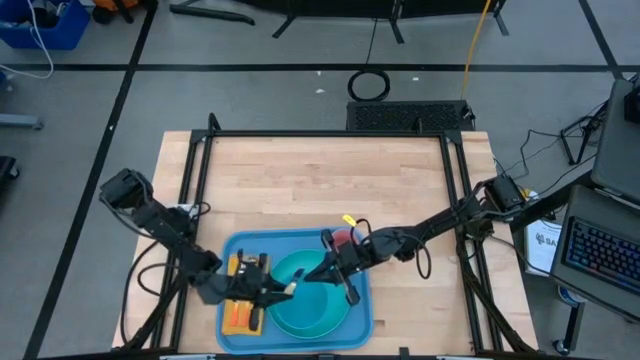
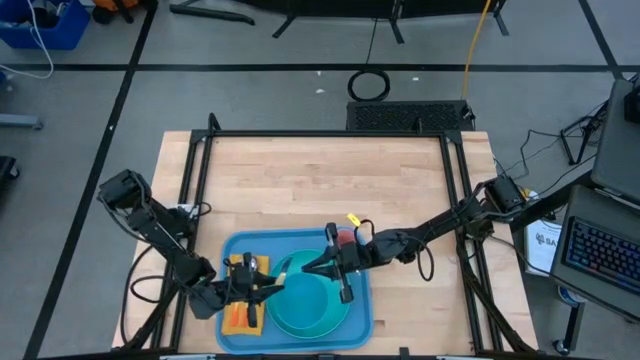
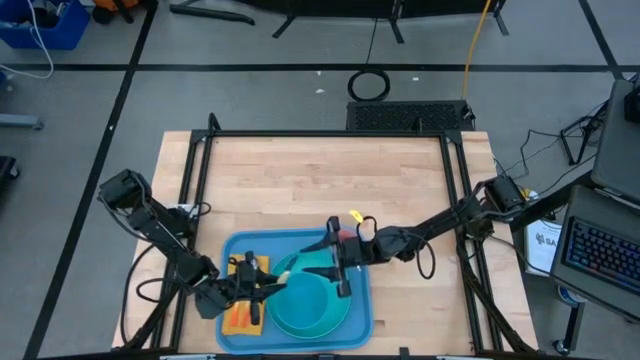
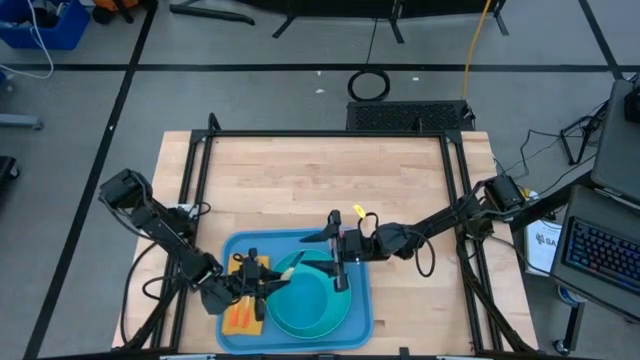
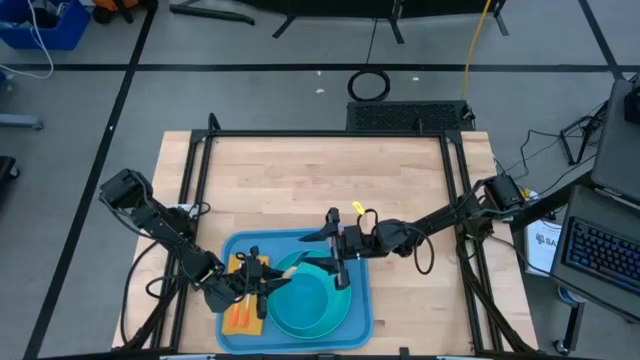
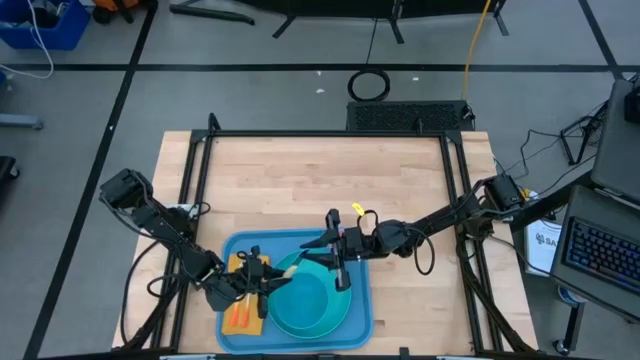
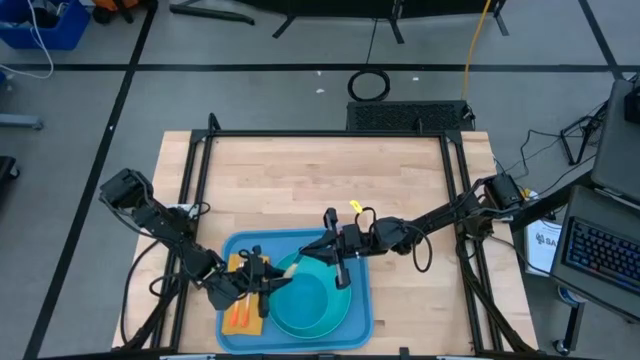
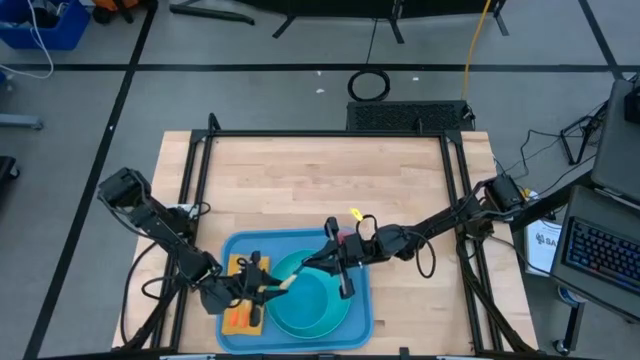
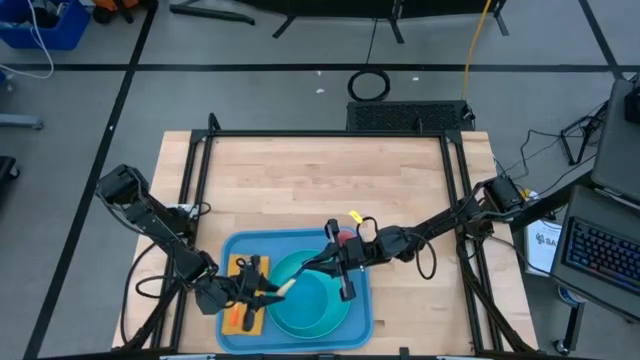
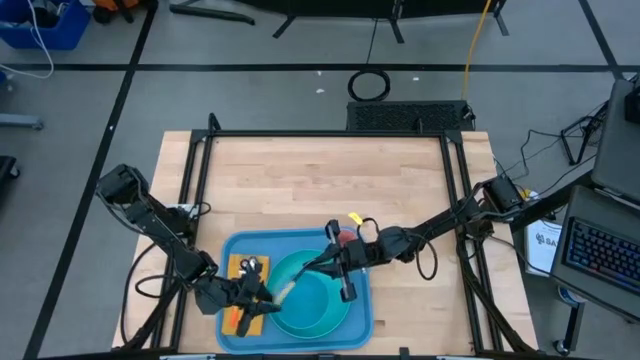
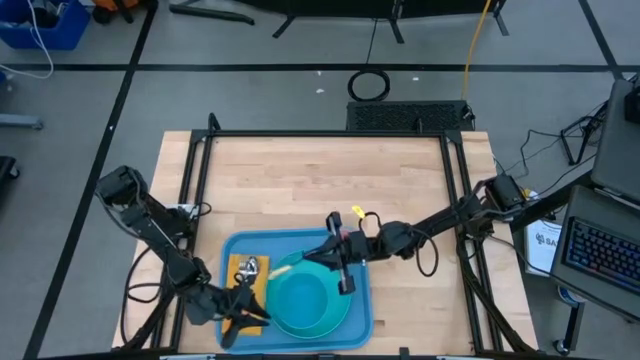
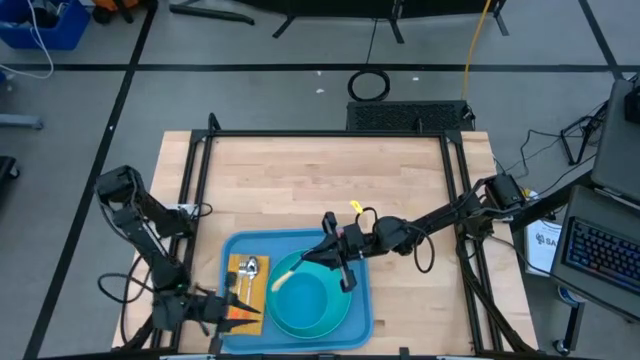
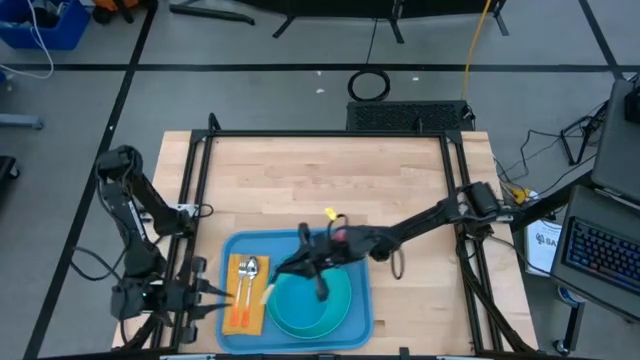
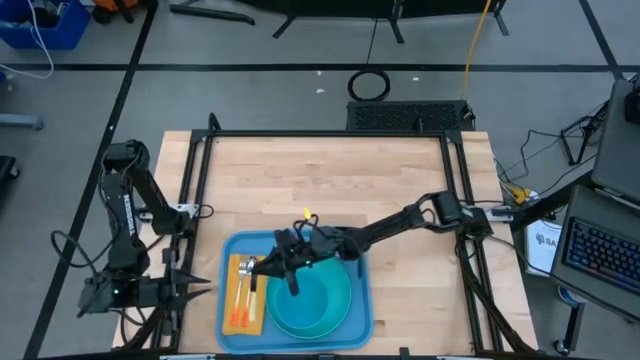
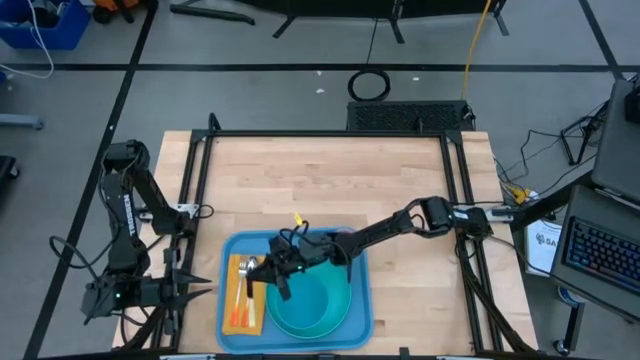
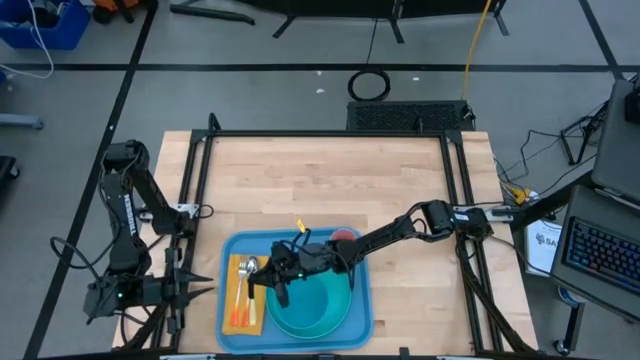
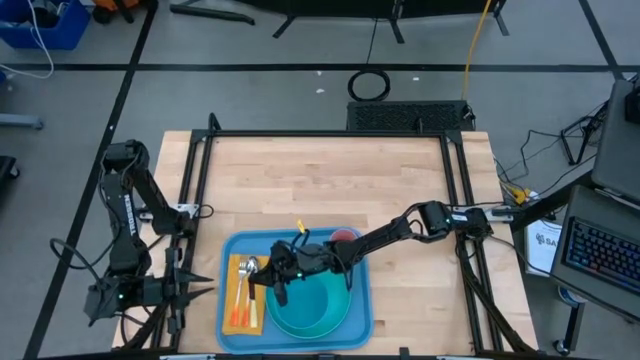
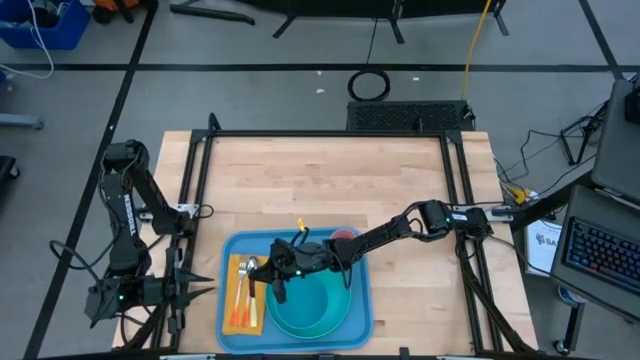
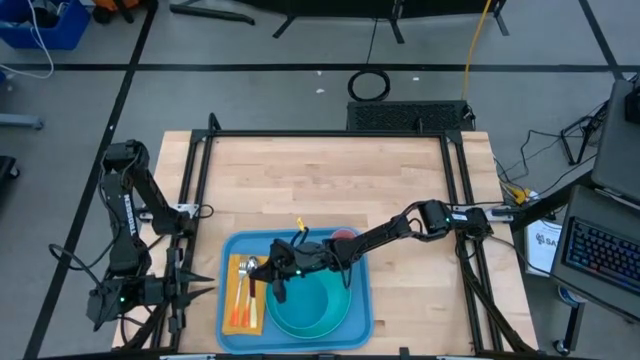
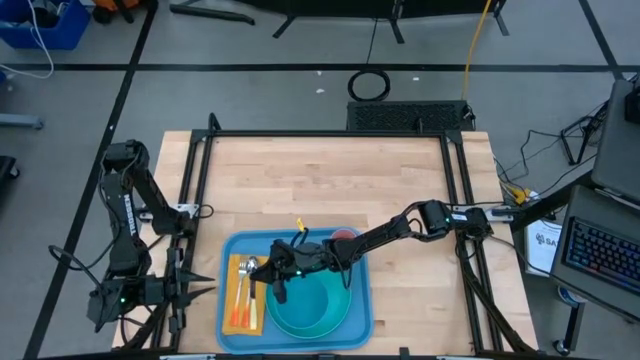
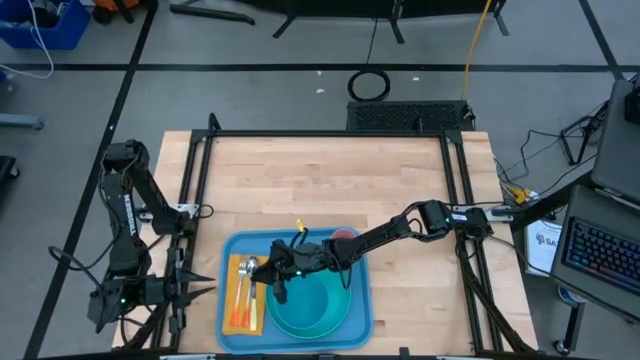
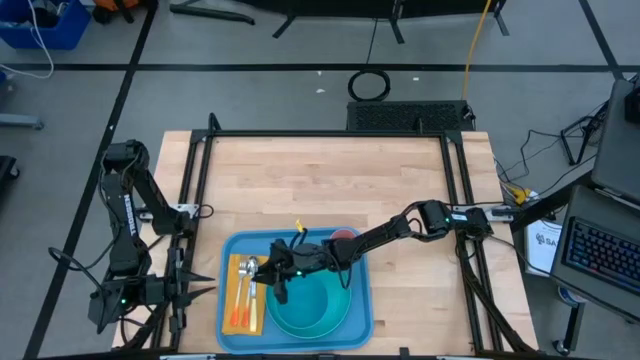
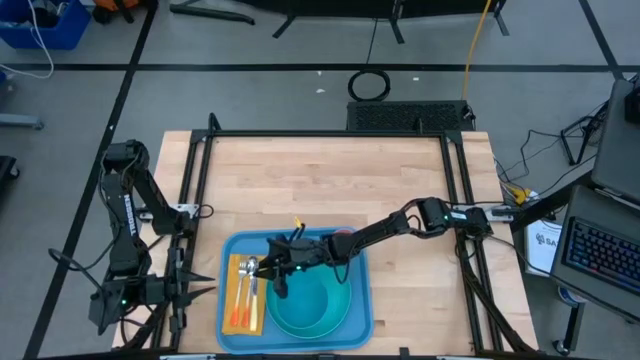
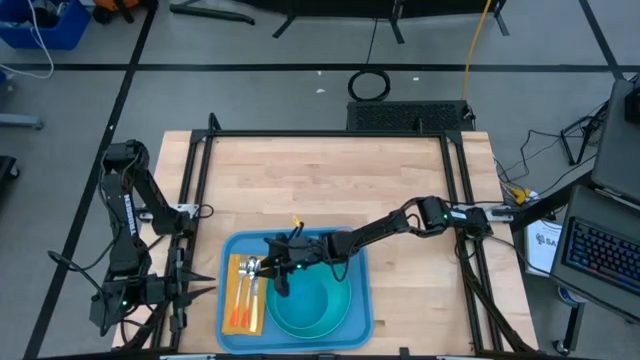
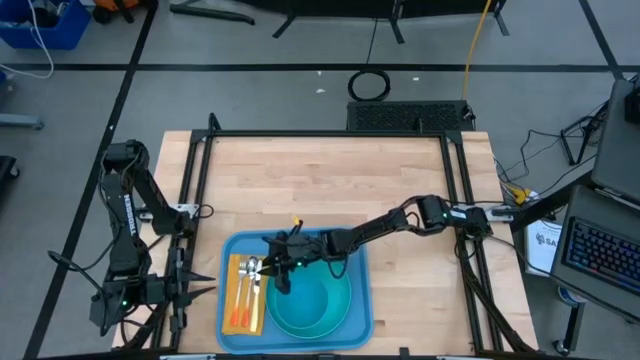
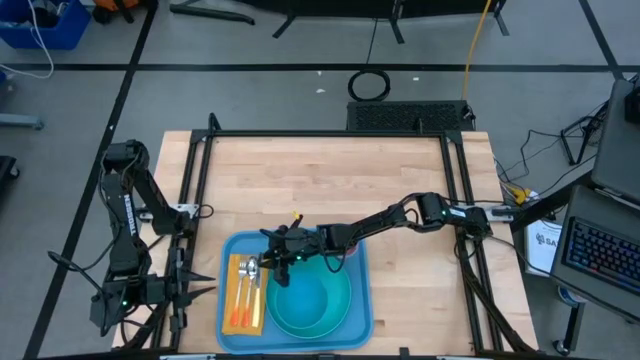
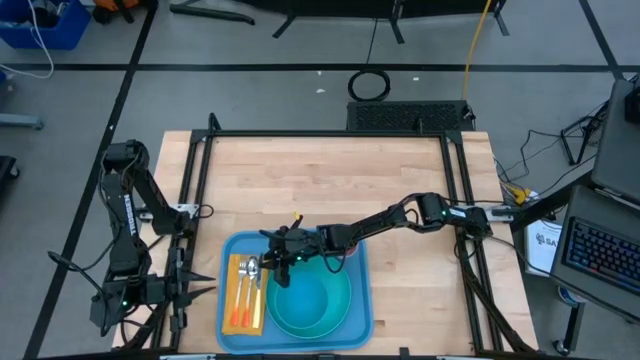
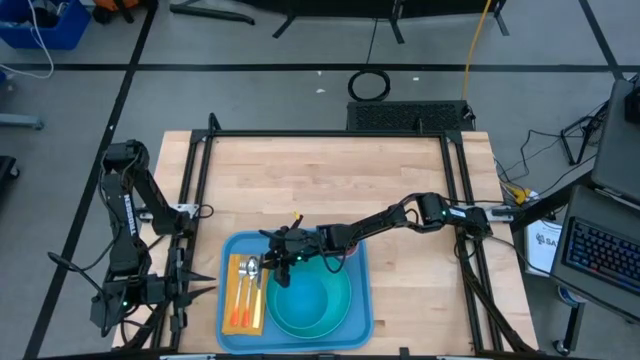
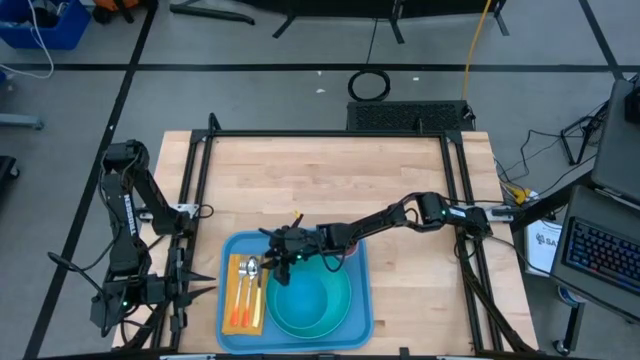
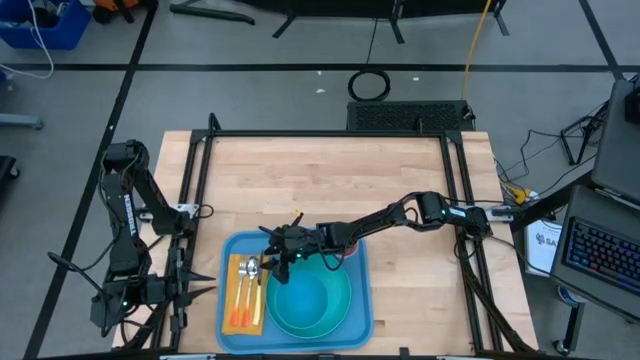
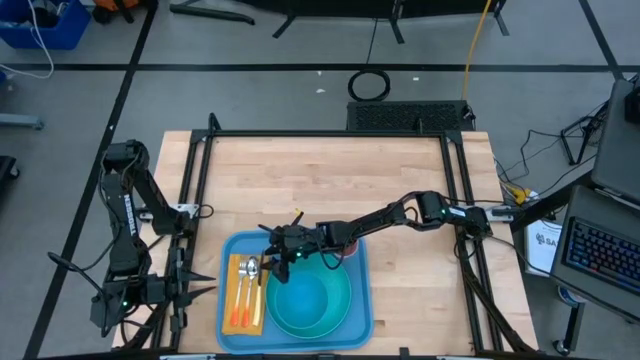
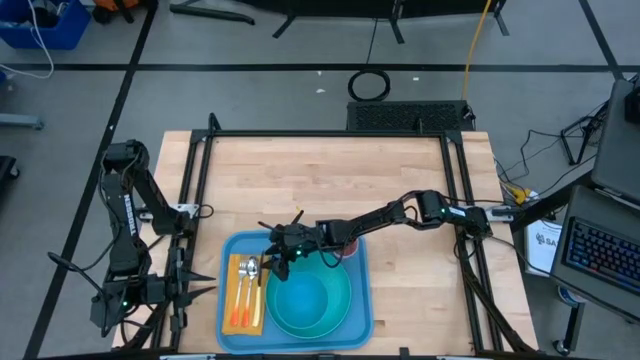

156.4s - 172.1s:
Task: Set up tray
Put the yellow table knife on the yellow table napkin to the right of the orange spoon

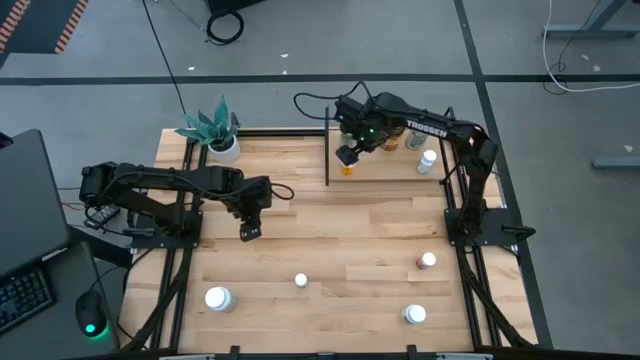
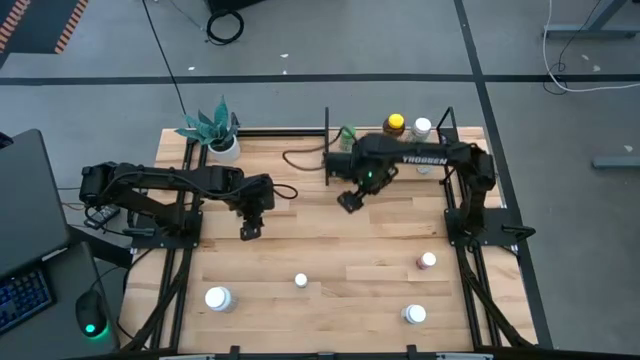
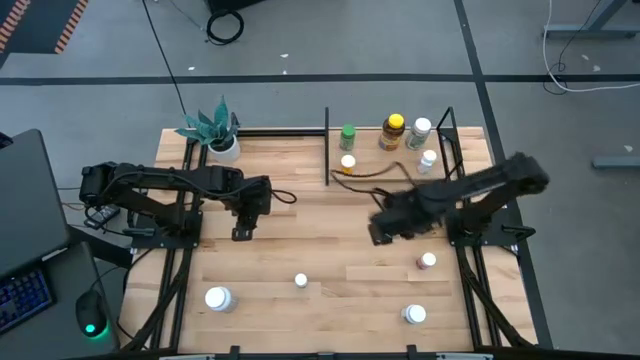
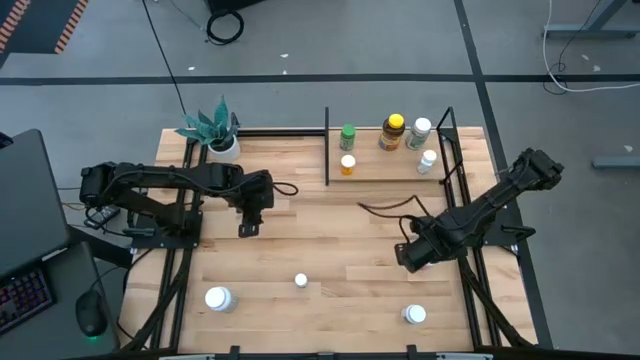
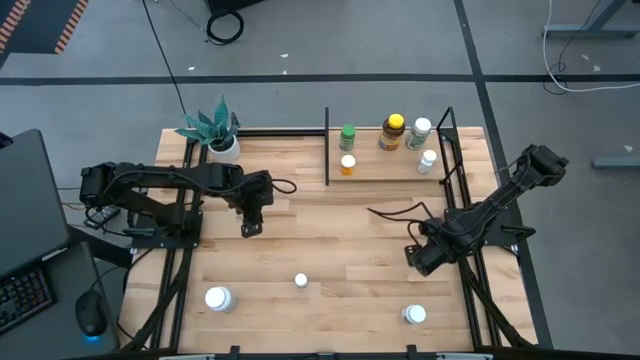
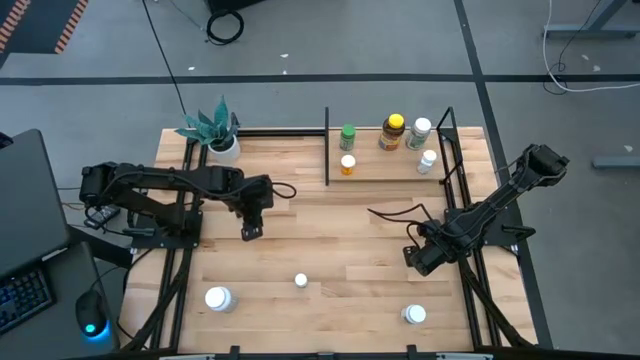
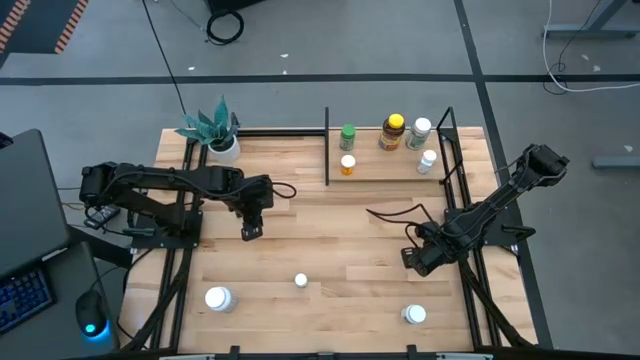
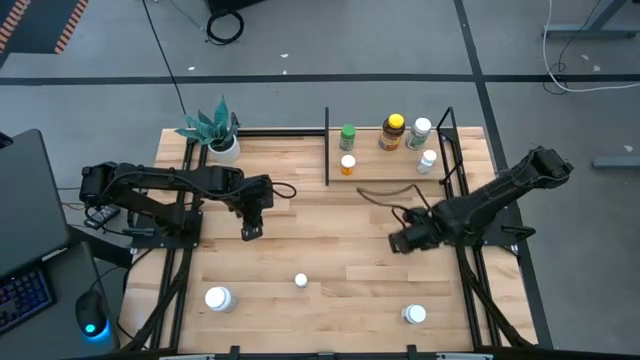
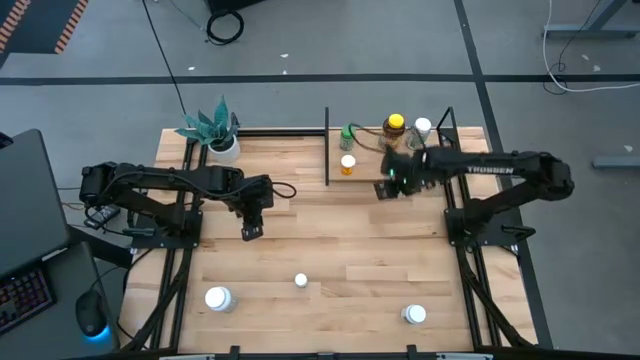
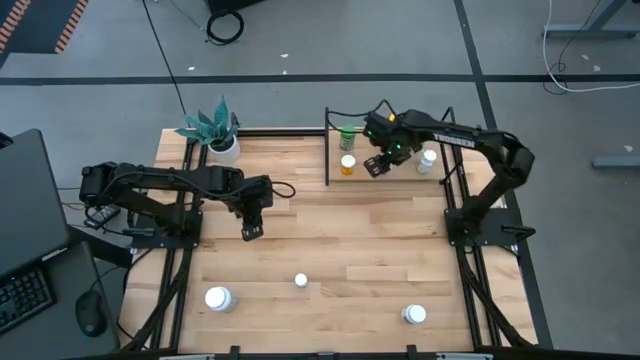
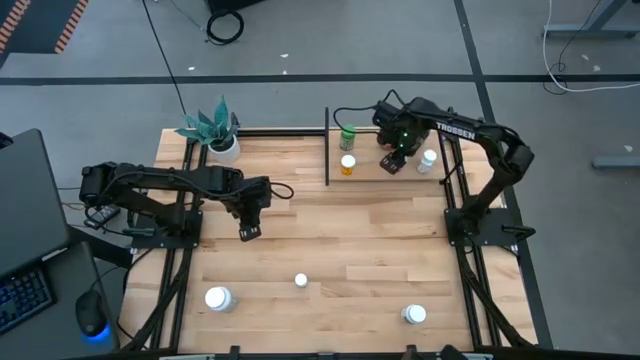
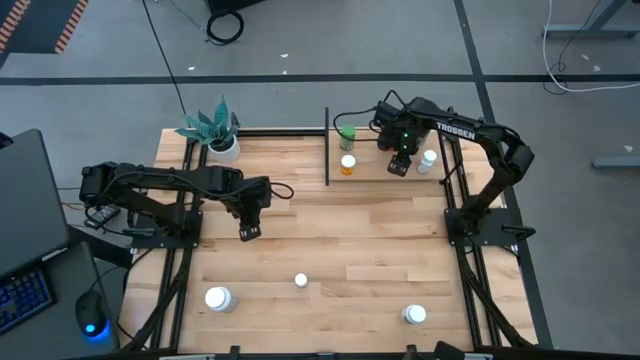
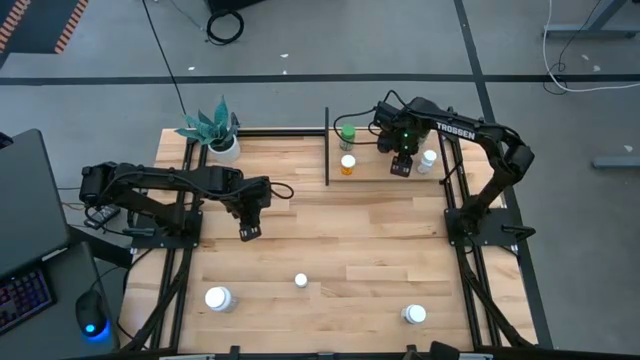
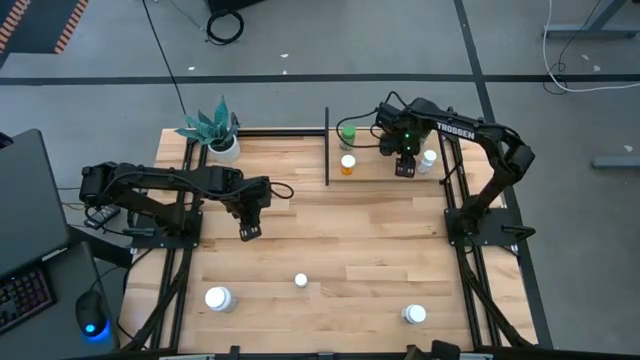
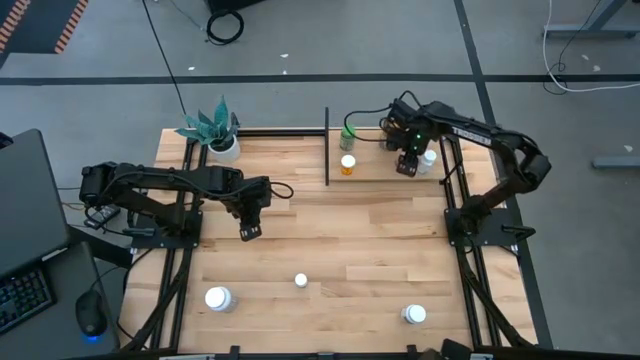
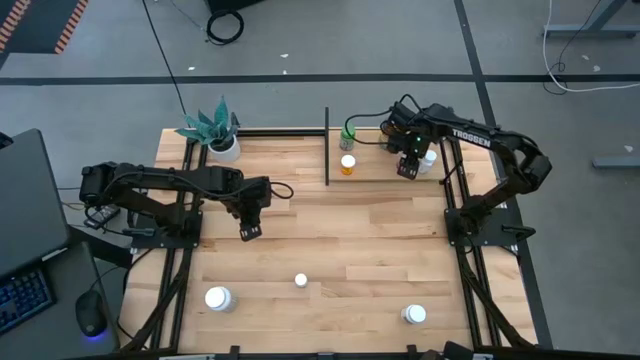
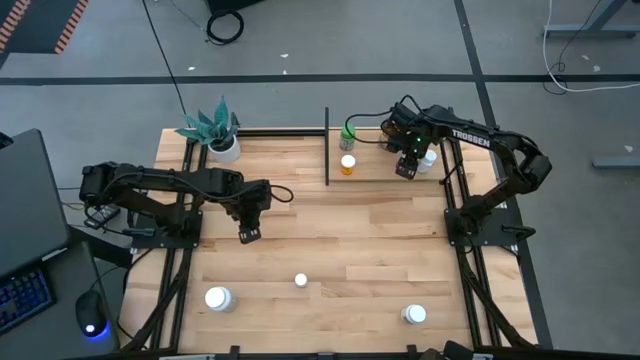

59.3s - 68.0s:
Task: Pick and place medicine bottles onto shelf by color
Put the pink pill bottle on the shelf
